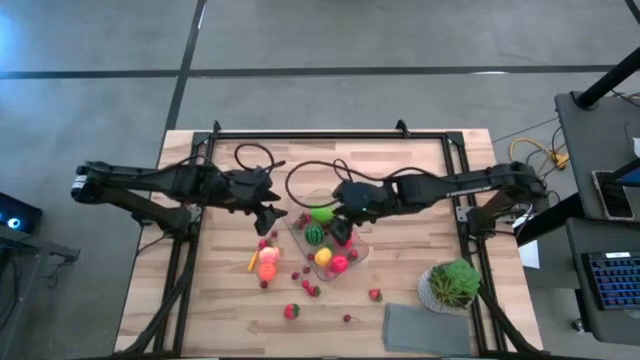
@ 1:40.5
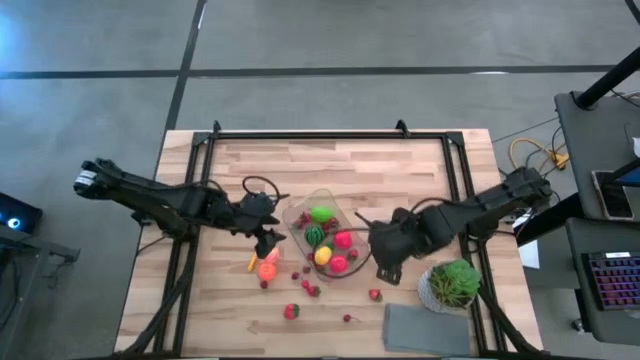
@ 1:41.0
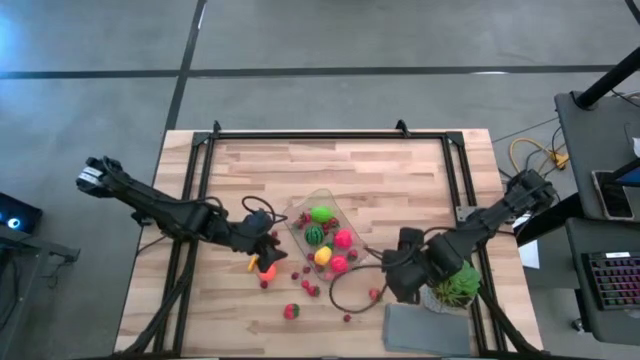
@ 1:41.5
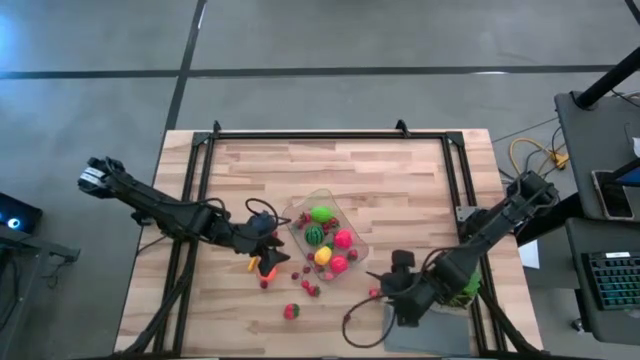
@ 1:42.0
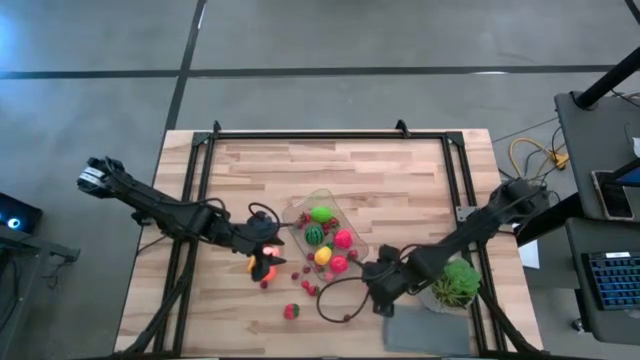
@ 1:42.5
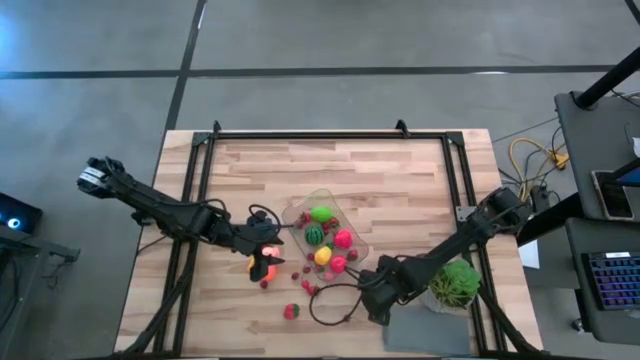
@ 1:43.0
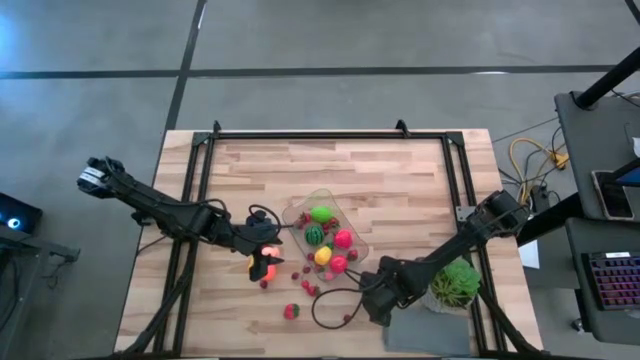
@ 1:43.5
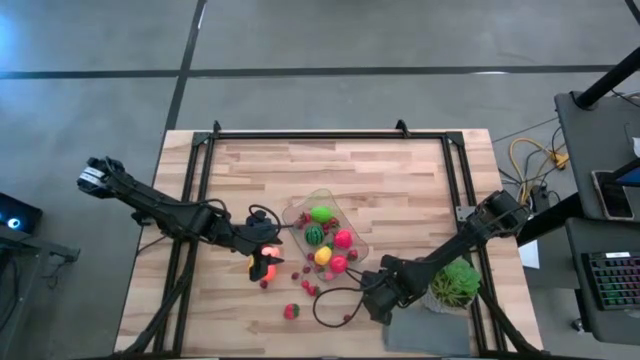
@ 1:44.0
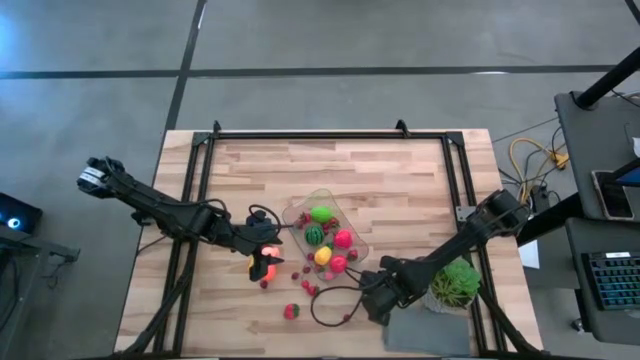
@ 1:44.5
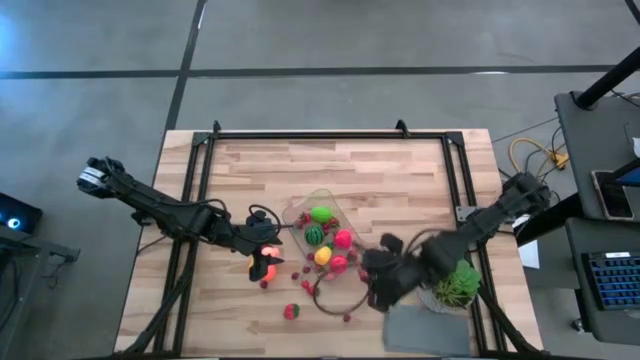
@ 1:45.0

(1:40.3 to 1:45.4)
Task: Pick and placing Produce into tupperware
Put the red strawberry into the transparent bin

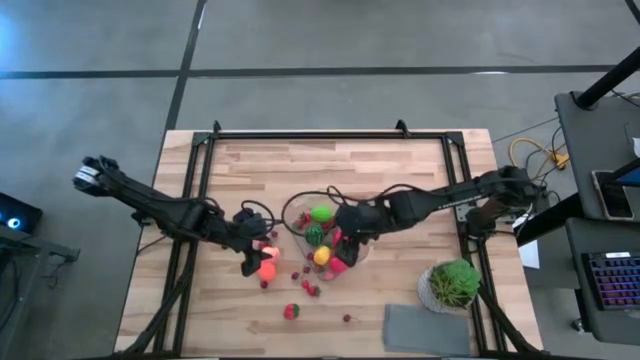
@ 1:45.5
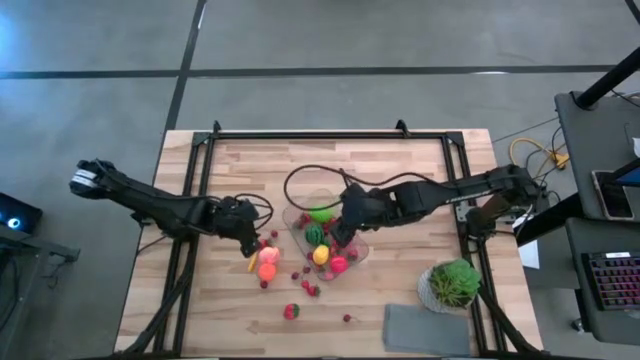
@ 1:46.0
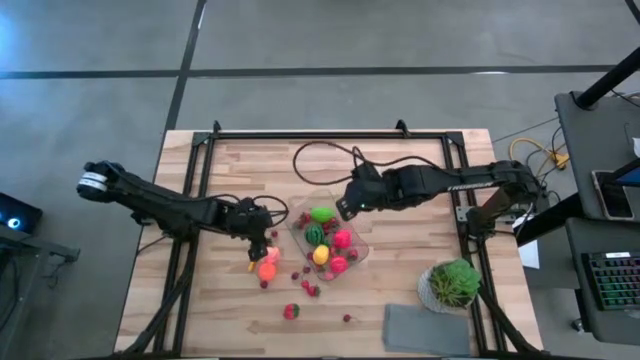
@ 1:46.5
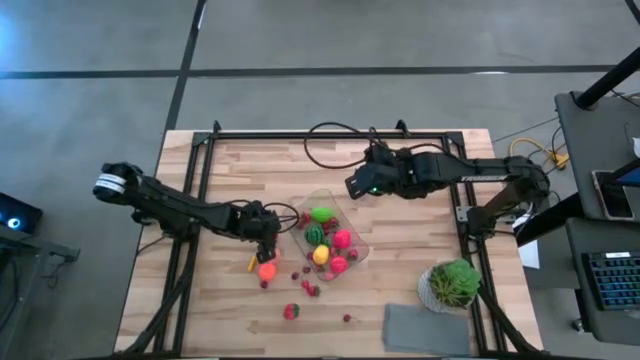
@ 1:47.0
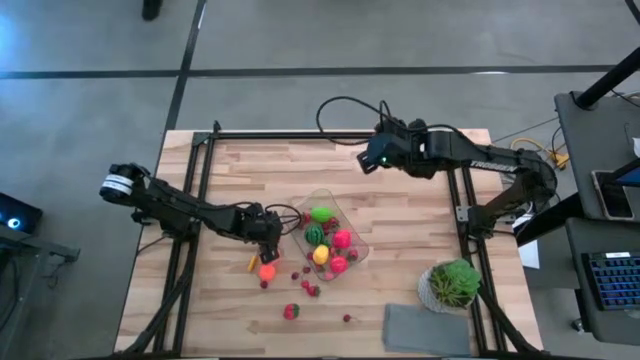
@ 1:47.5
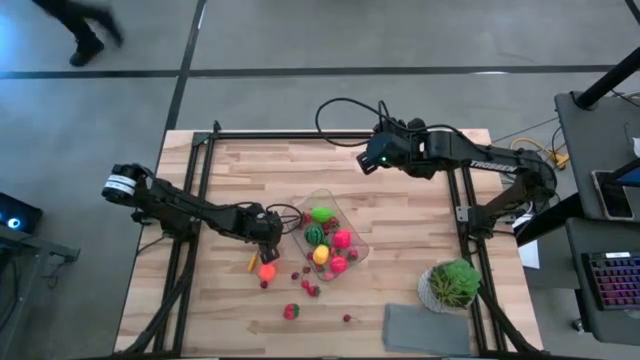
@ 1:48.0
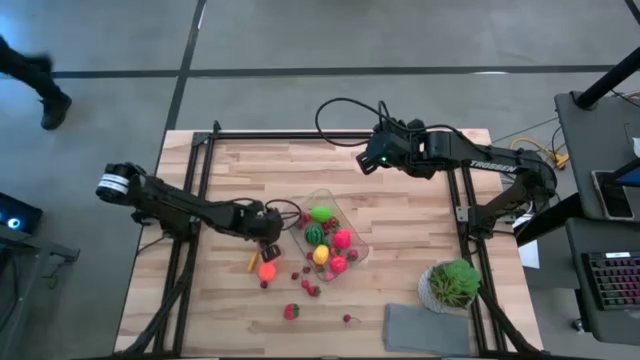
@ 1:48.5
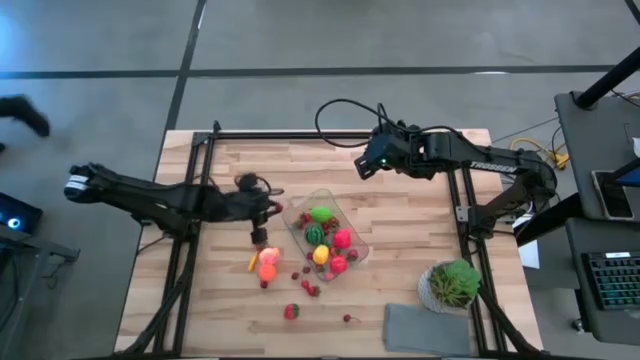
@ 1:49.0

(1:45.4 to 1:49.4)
Put the red cherry into the transparent bin

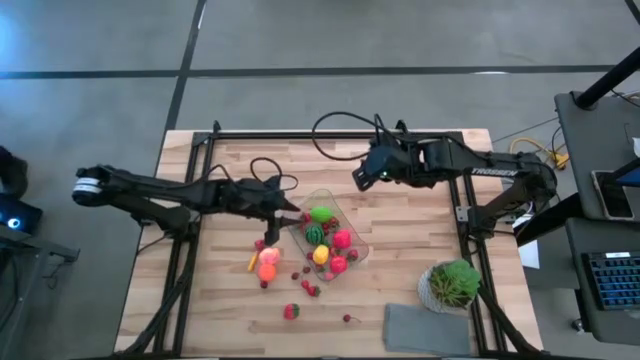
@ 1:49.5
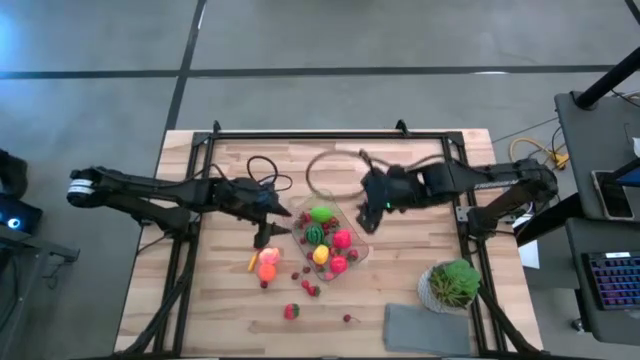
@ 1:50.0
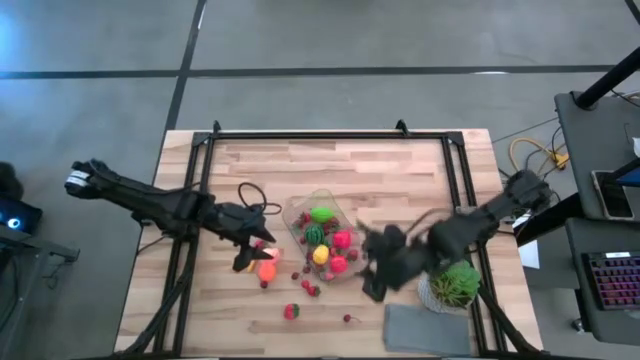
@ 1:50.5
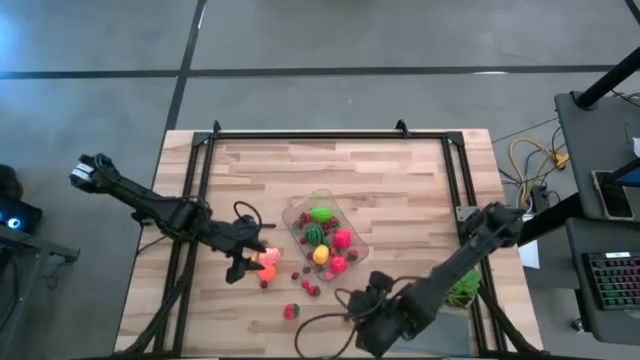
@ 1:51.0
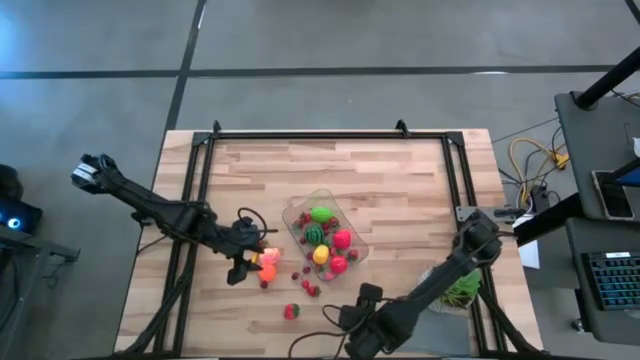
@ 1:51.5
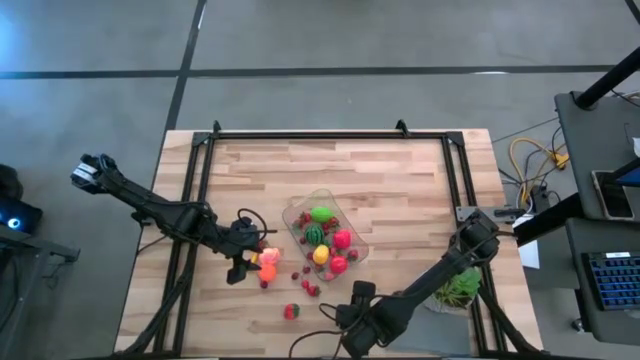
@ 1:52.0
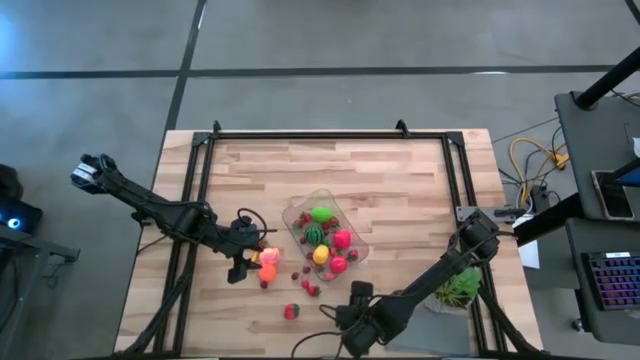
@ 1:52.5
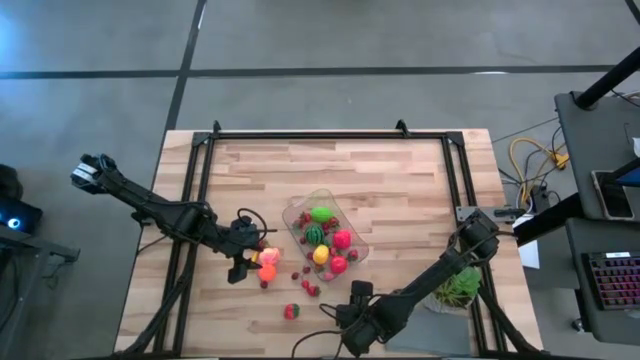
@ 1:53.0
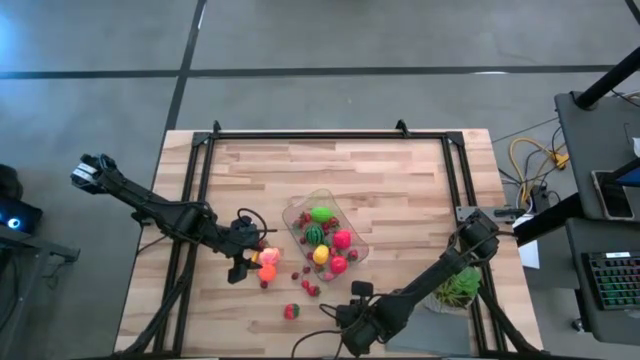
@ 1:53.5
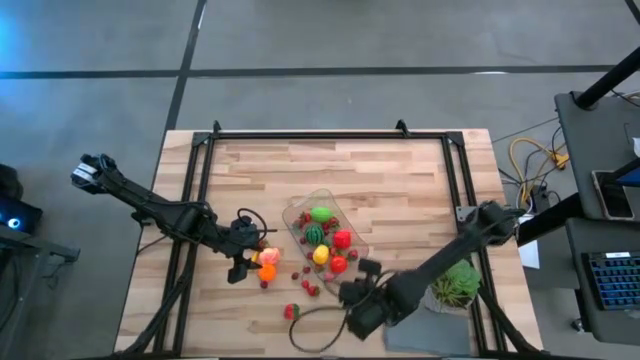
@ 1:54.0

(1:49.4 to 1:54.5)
Put the red cherry into the transparent bin

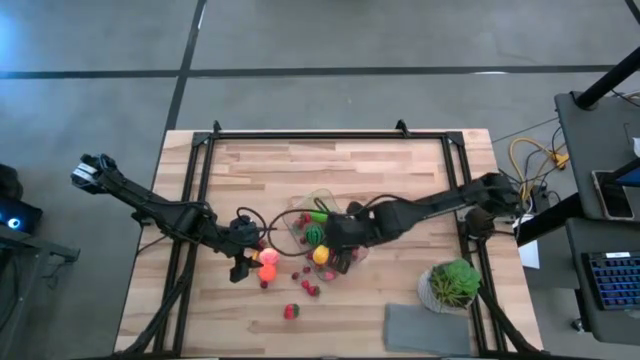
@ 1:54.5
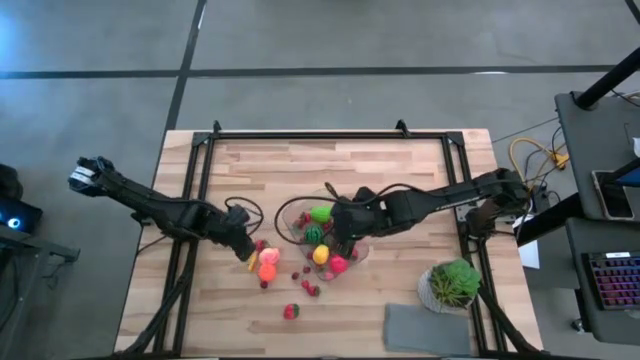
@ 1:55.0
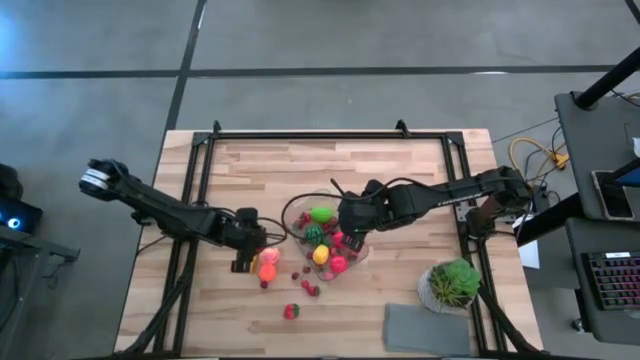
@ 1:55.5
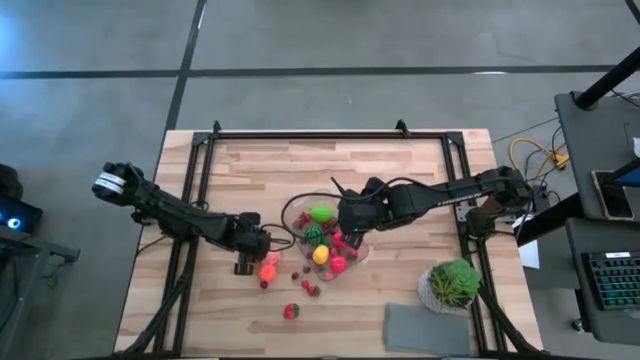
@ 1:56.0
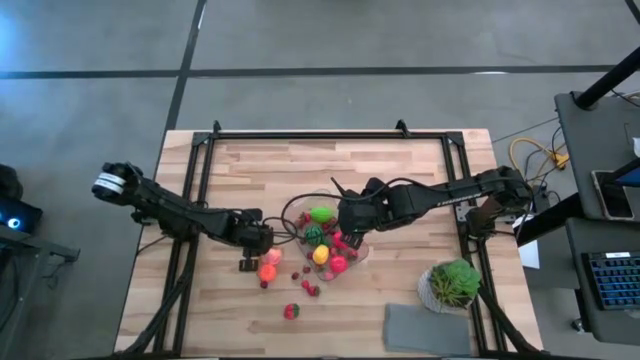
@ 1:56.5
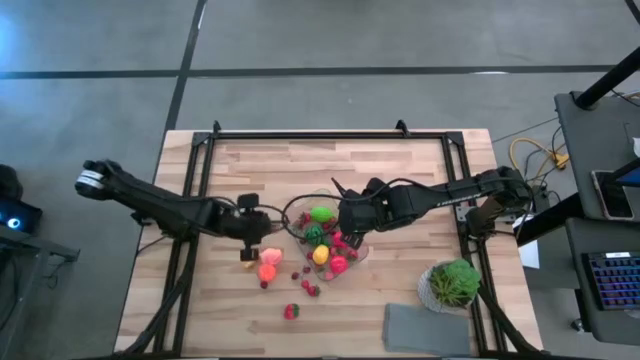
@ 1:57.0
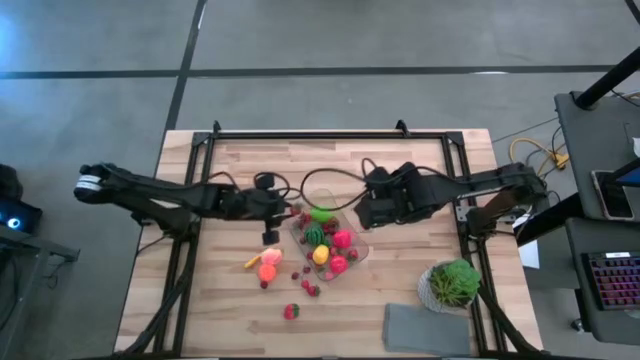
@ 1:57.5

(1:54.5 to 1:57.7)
Put the red strawberry into the transparent bin

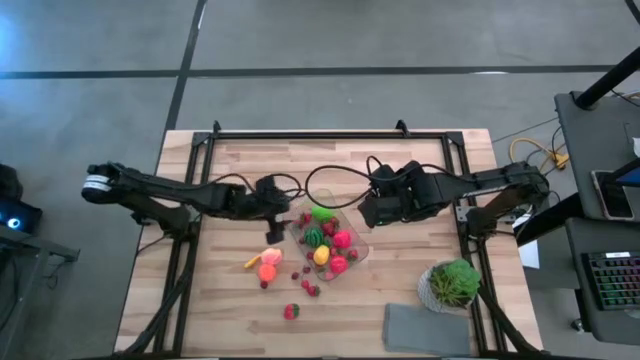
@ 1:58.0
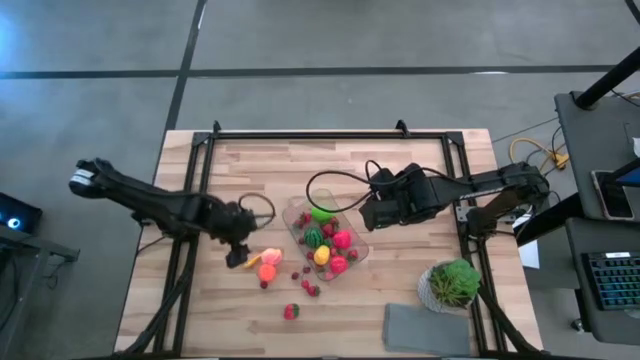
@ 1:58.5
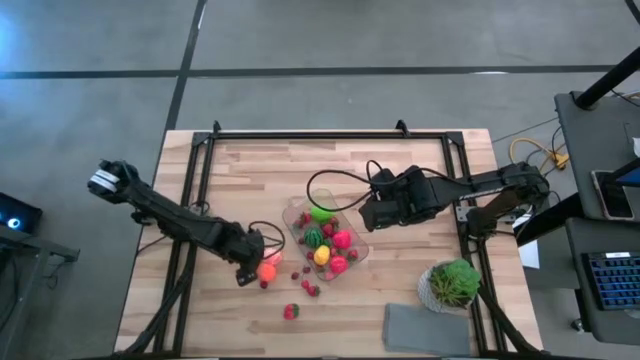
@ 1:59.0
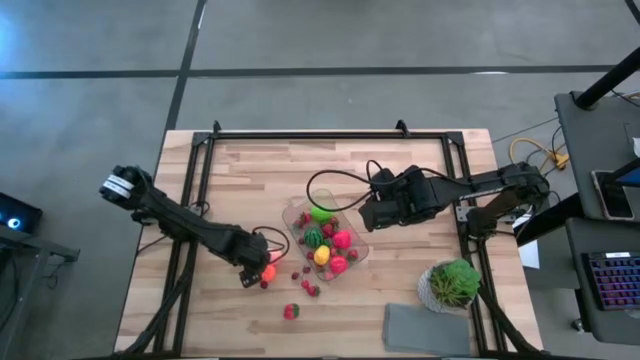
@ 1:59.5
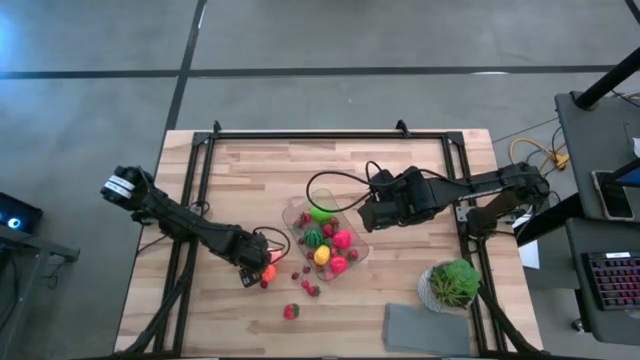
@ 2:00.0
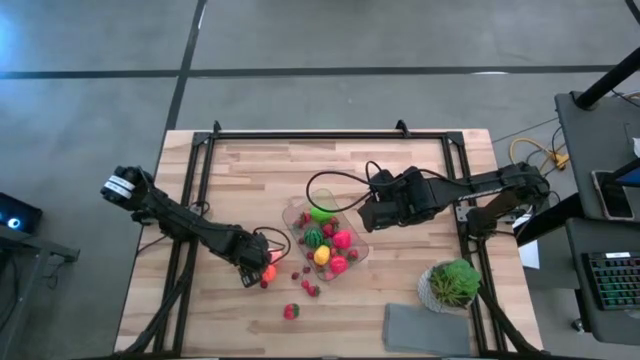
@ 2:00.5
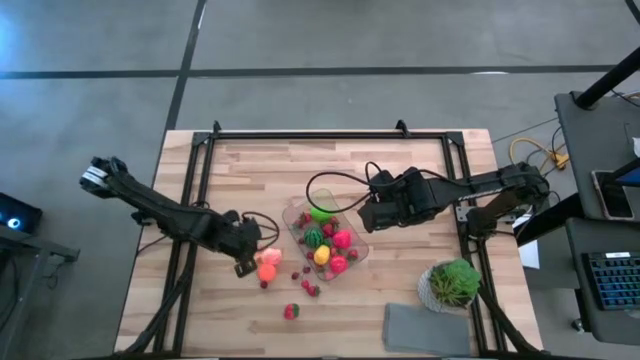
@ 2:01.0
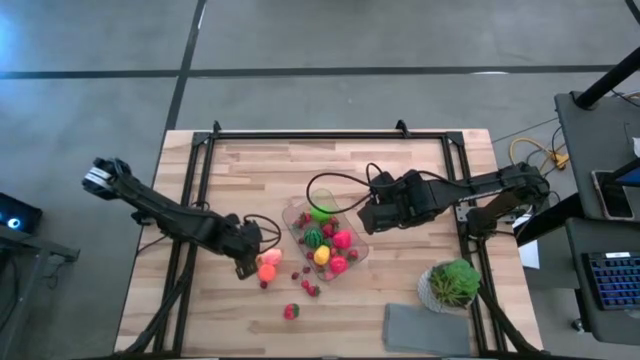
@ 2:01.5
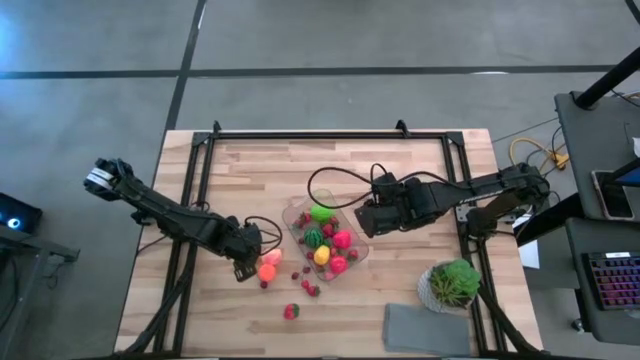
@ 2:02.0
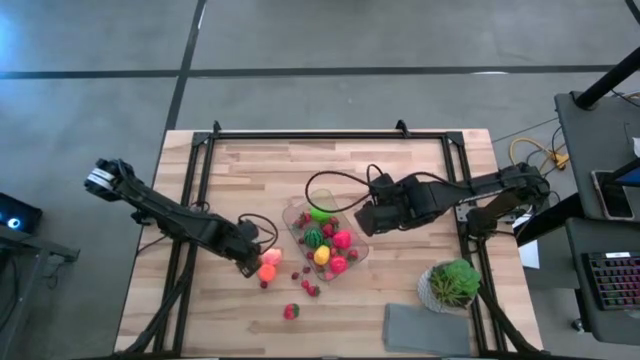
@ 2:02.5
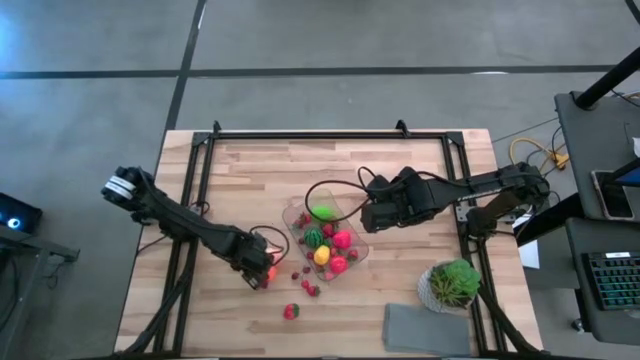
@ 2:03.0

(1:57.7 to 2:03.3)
Put the yellow corn into the transparent bin
